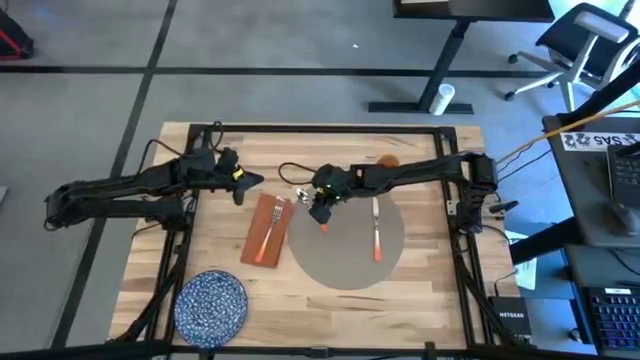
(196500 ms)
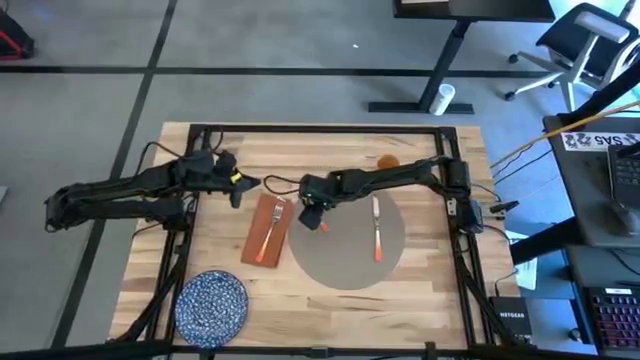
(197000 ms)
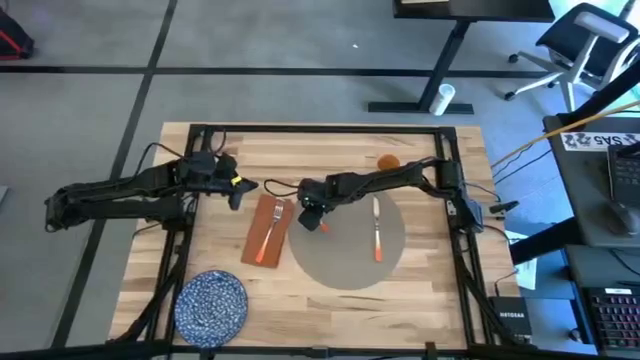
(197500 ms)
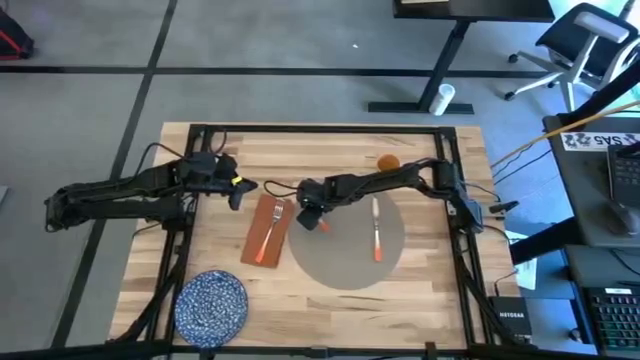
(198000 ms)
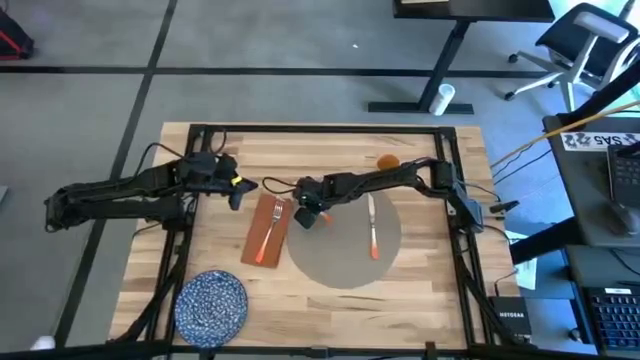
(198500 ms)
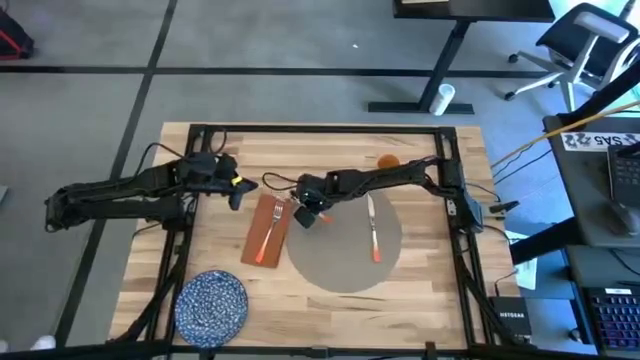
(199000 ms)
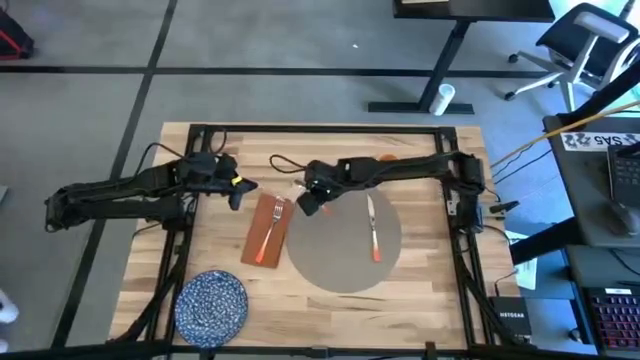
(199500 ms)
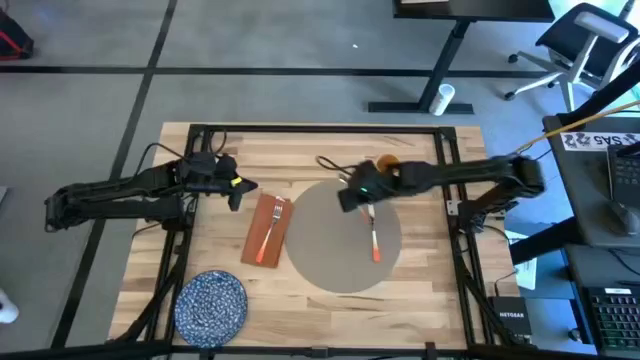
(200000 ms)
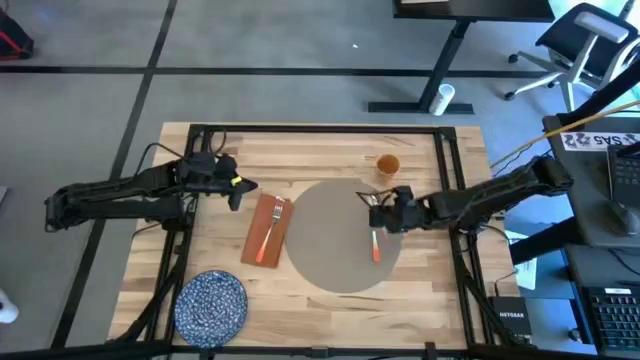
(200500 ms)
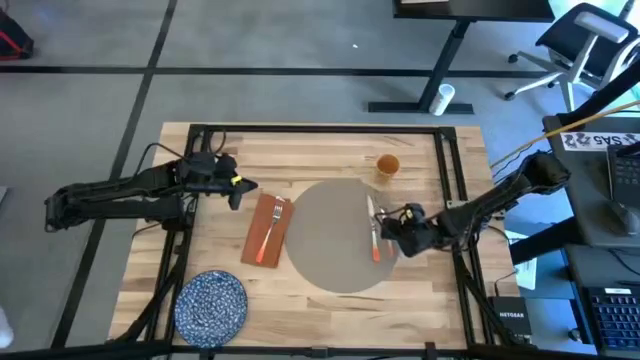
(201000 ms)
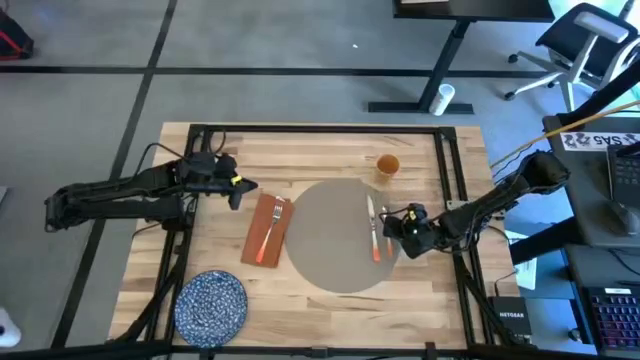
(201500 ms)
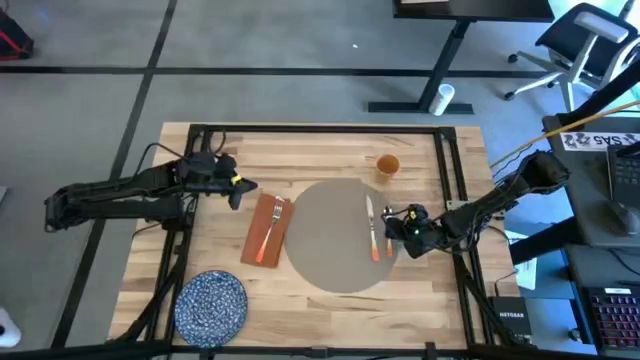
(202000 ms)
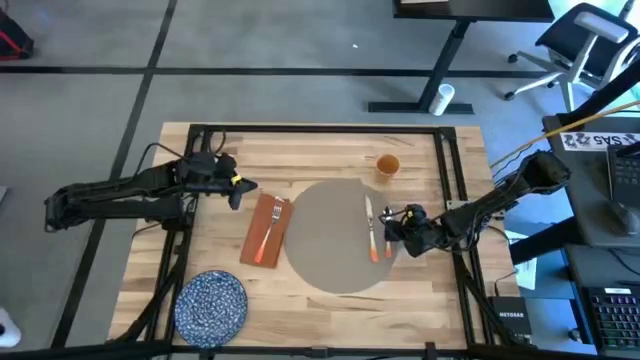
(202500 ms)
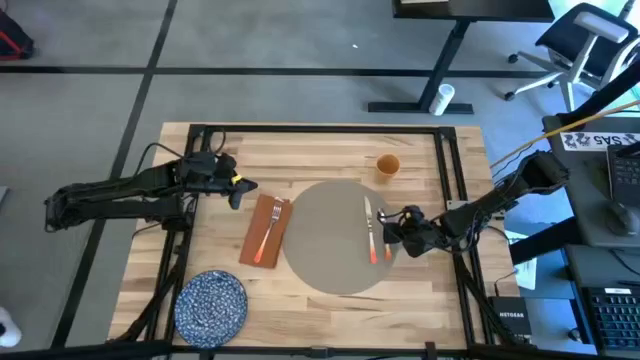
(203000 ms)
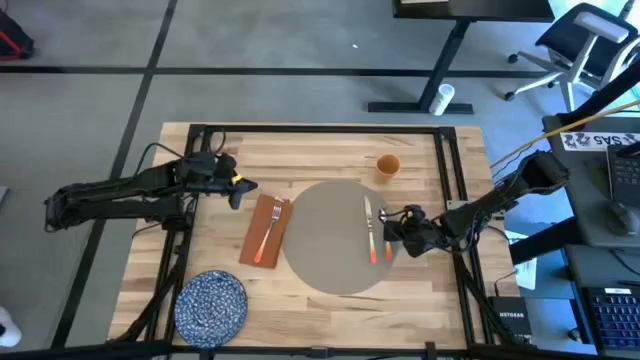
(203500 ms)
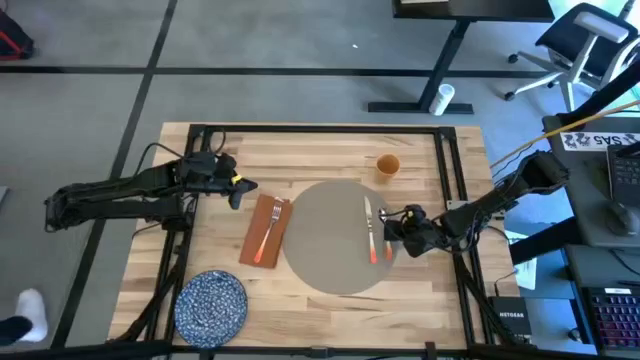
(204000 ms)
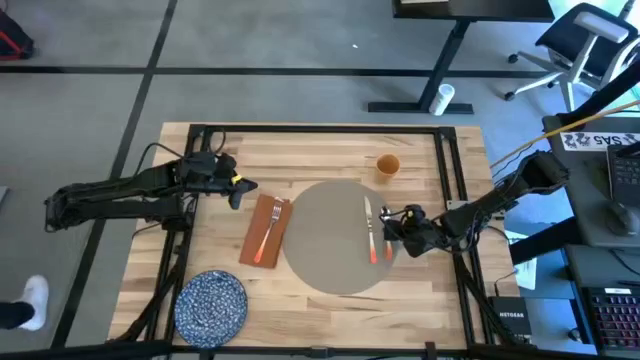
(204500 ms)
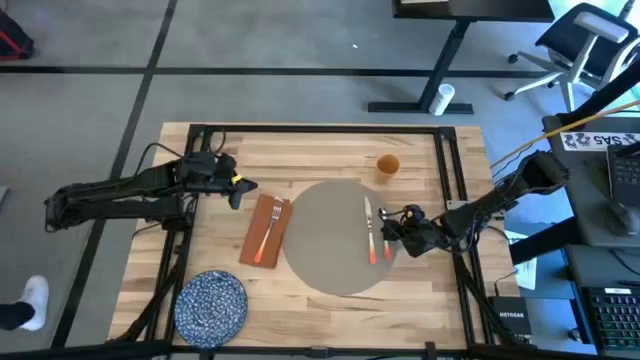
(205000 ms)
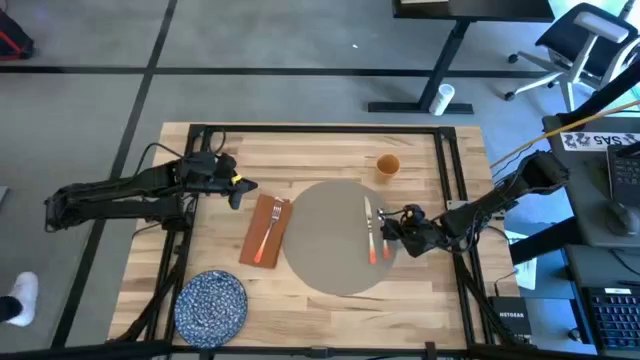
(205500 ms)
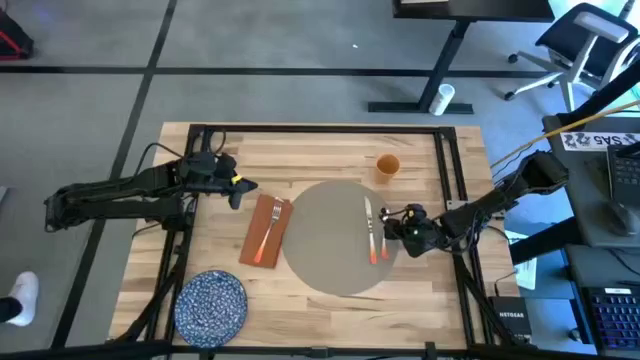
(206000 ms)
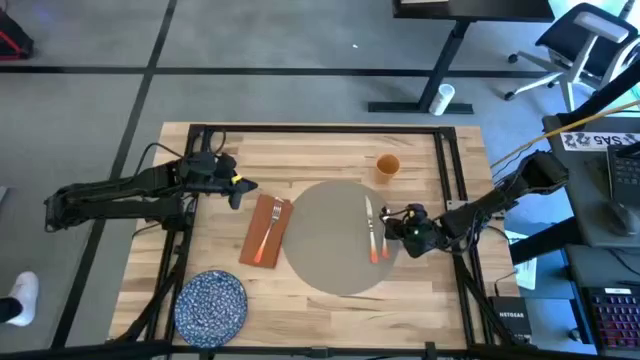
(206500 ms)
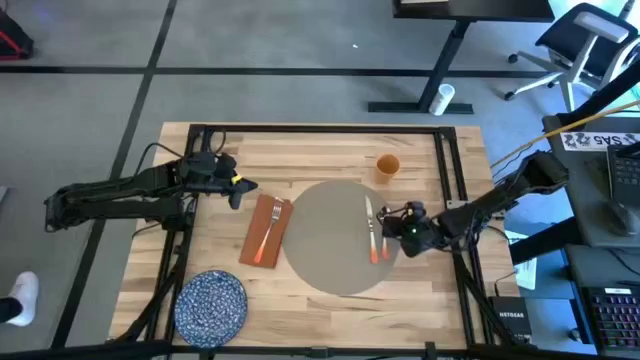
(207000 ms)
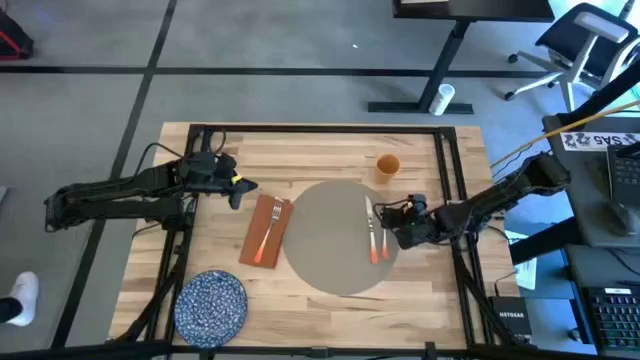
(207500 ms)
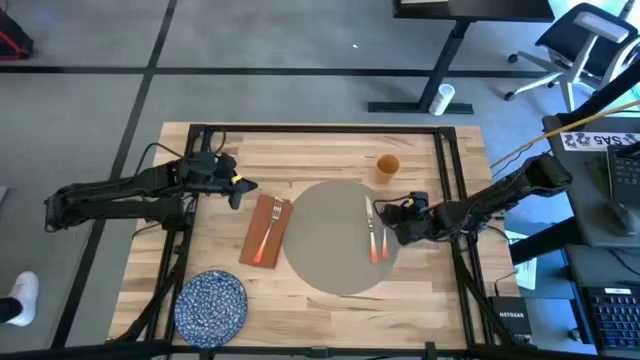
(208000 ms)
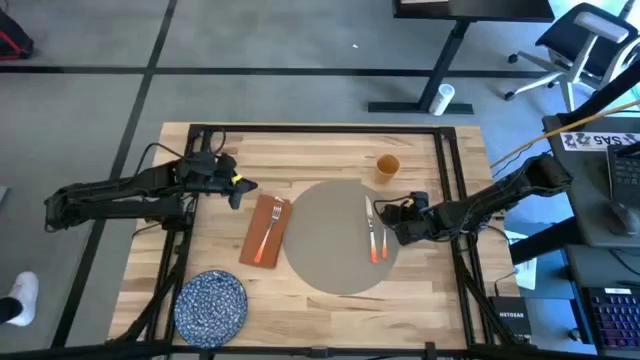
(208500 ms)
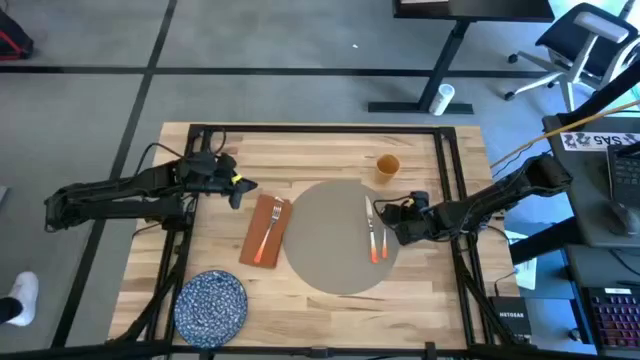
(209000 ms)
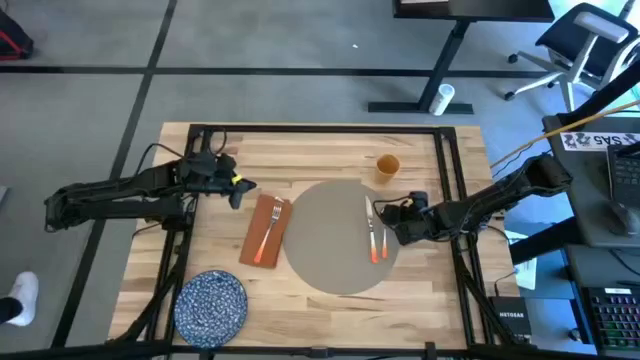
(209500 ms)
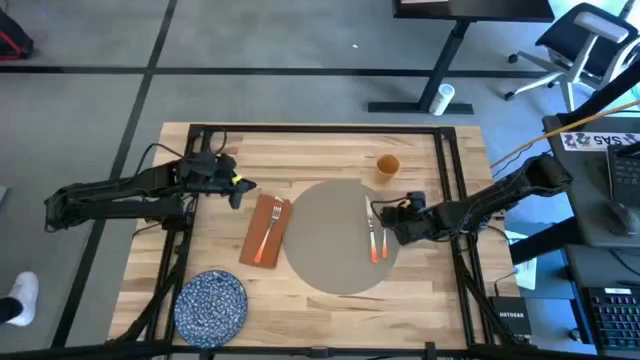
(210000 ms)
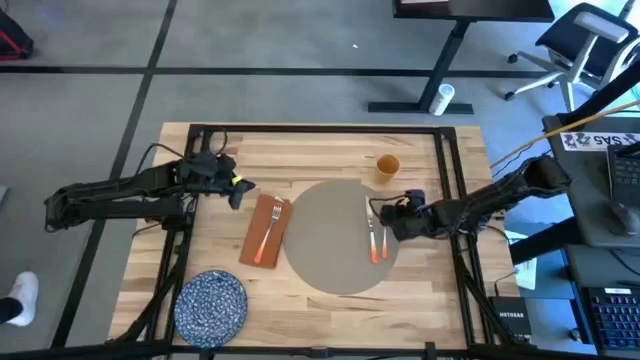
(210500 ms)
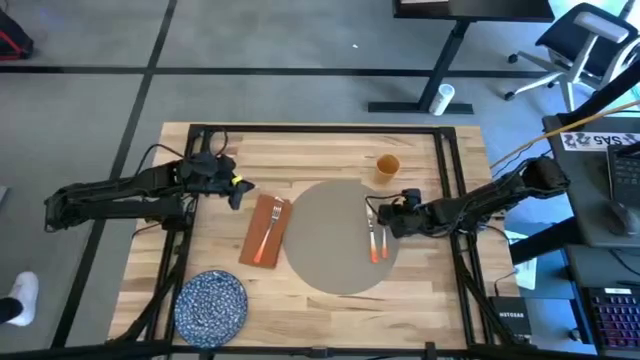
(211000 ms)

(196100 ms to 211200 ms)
Task: Set table place
Put the orange spoon on the gray mat

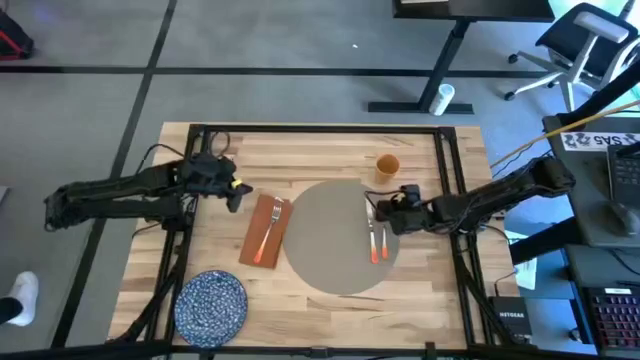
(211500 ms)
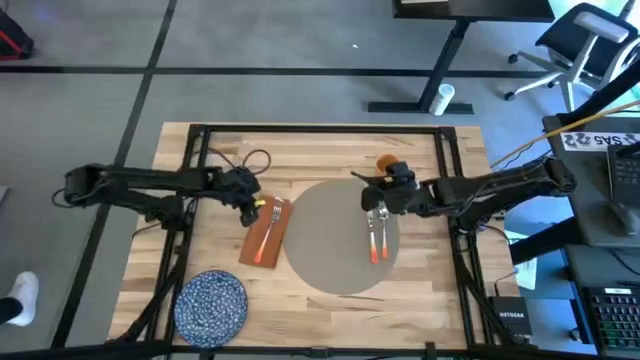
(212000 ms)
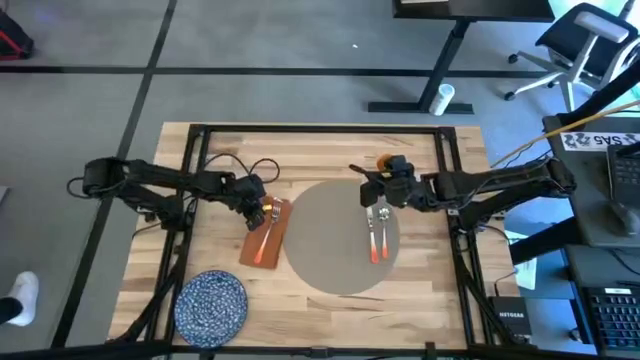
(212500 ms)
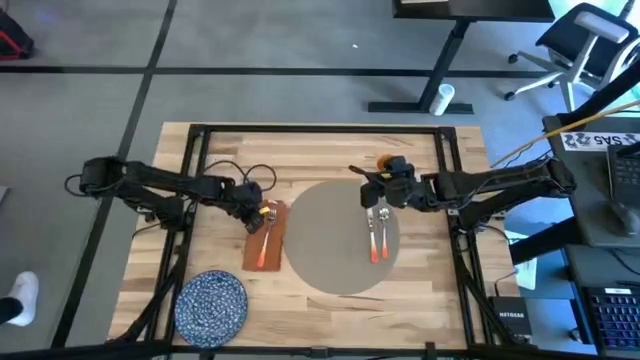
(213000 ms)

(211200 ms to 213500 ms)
Adjust the orange napkin

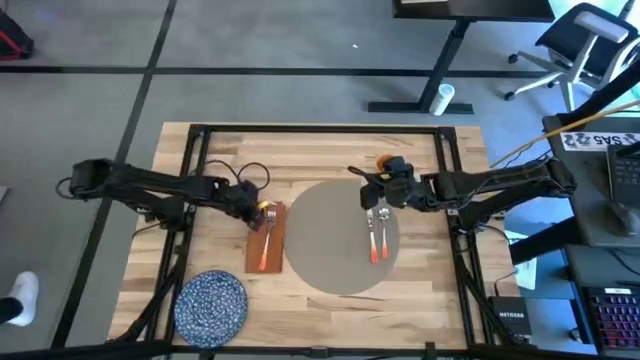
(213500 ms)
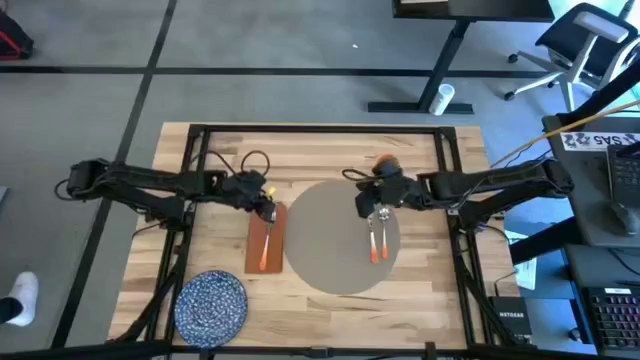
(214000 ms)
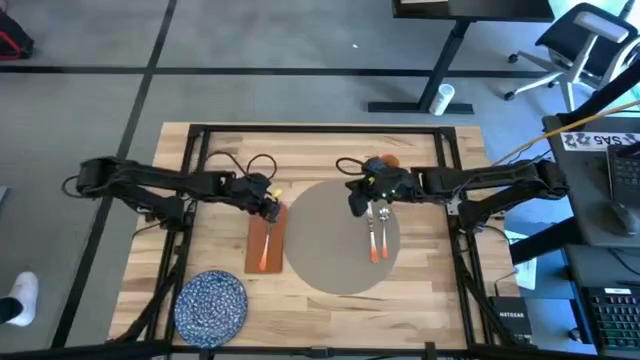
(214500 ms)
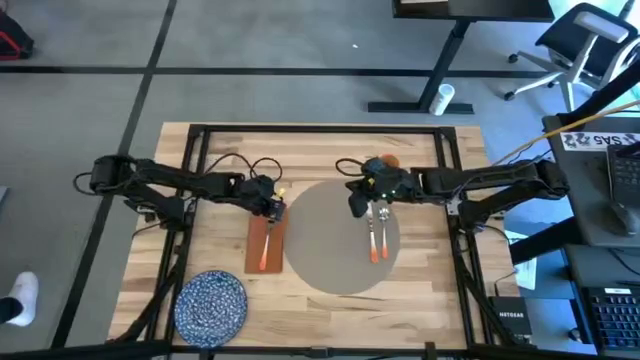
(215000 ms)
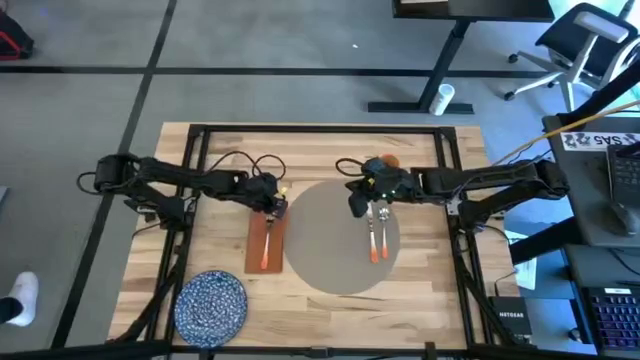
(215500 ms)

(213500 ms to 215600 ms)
Adjust the orange fork on the orange napkin

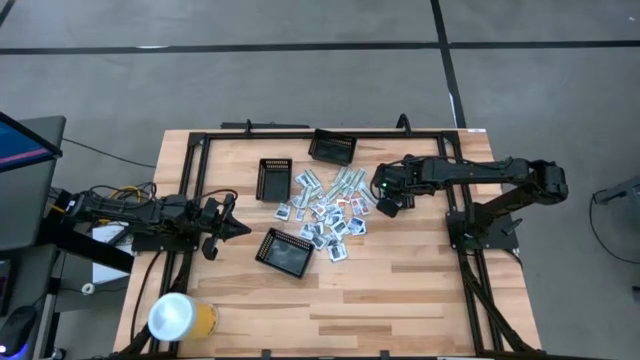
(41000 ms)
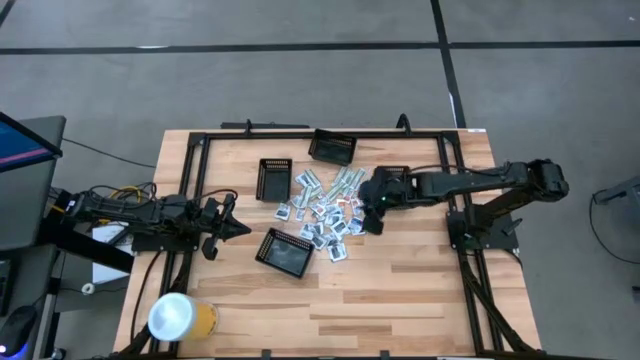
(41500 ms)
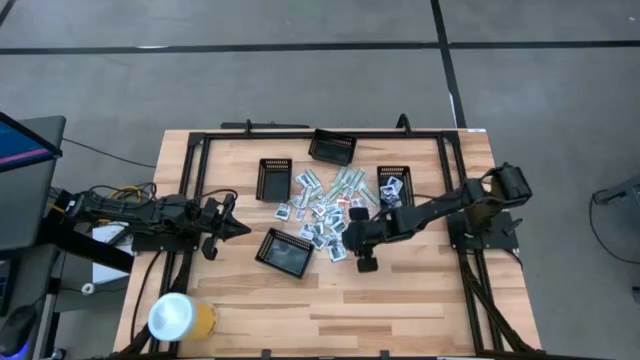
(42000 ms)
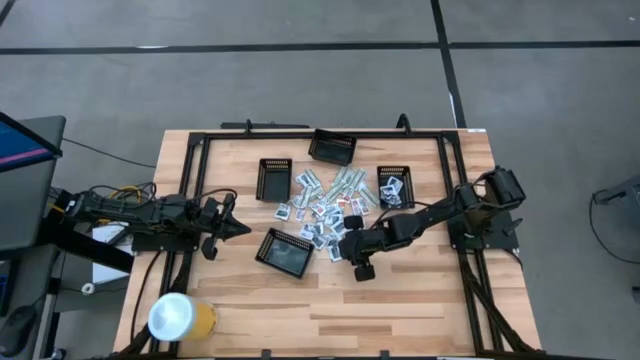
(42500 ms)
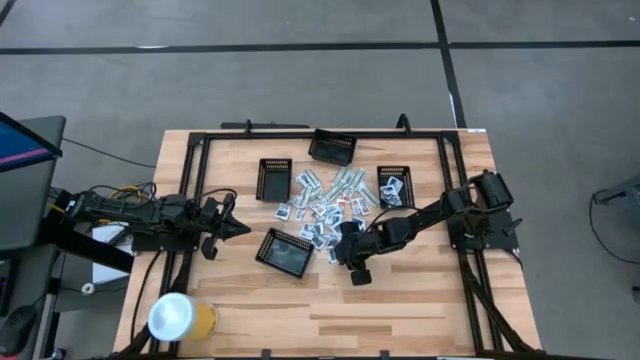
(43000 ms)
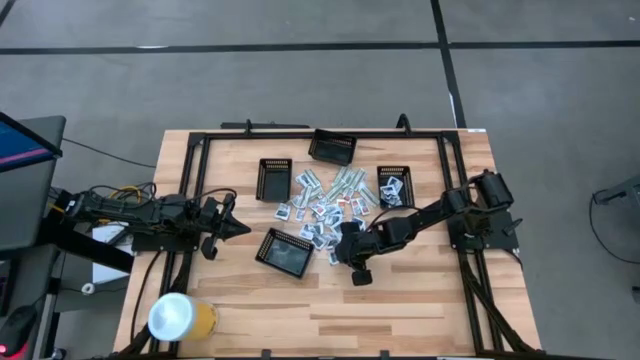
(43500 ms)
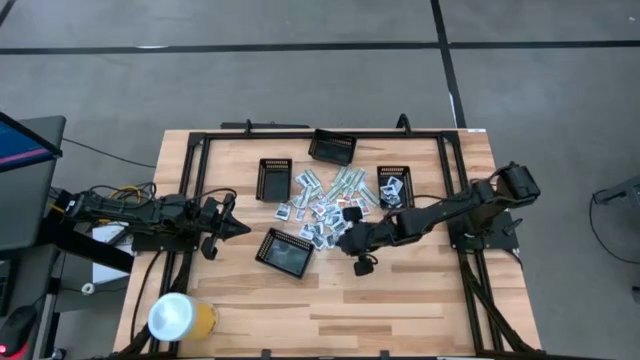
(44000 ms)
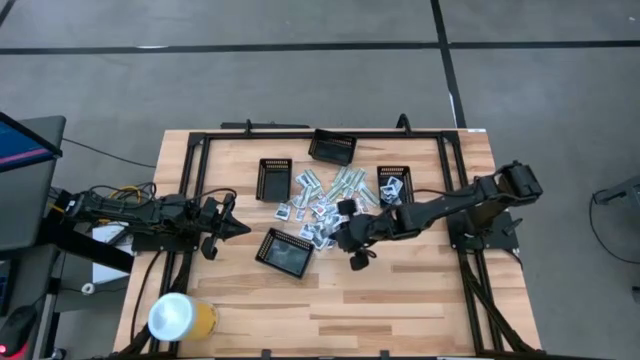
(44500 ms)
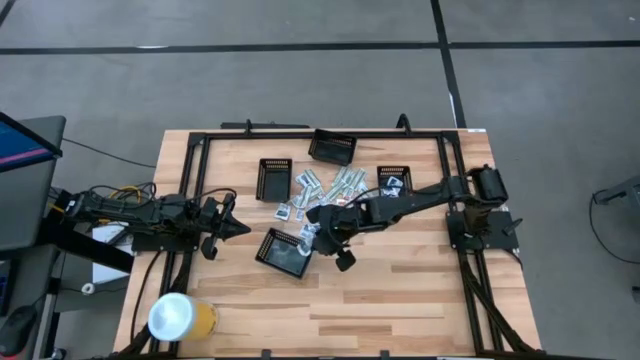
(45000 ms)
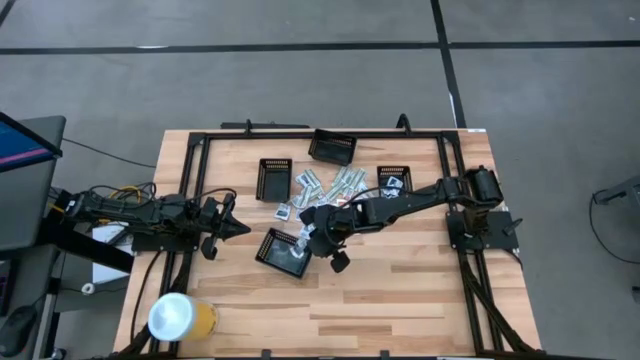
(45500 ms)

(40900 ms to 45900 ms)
Task: Pick & Place First Aid Supplies
Put the white towelette pack into the bottom black bin
